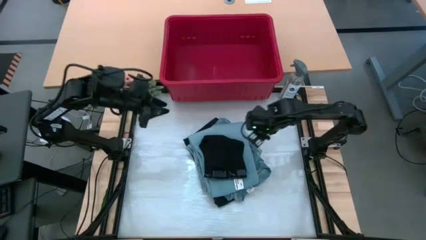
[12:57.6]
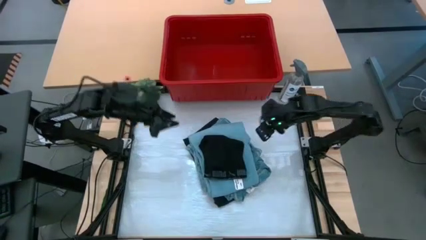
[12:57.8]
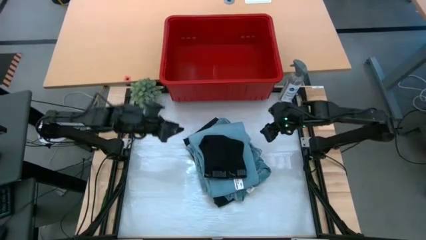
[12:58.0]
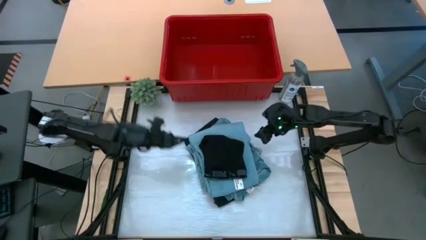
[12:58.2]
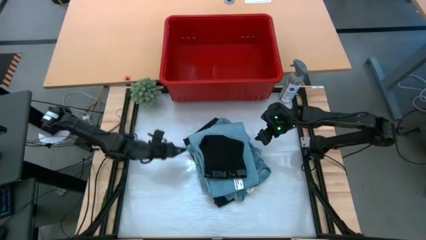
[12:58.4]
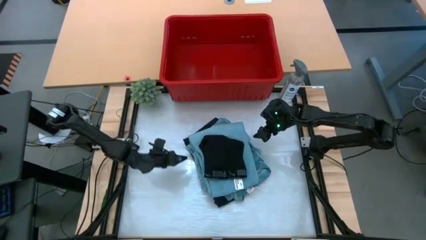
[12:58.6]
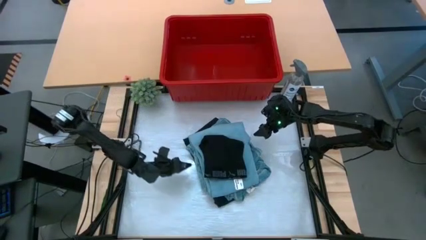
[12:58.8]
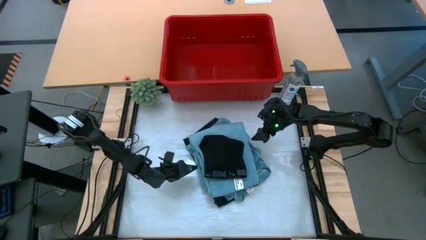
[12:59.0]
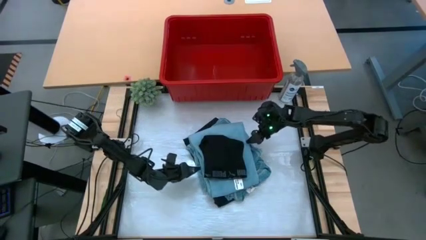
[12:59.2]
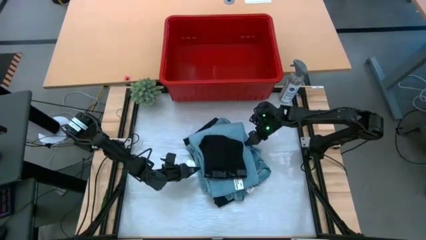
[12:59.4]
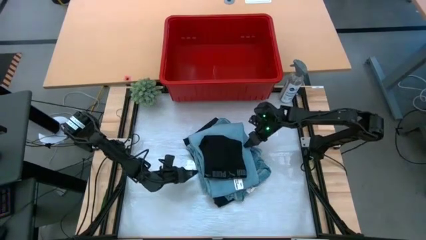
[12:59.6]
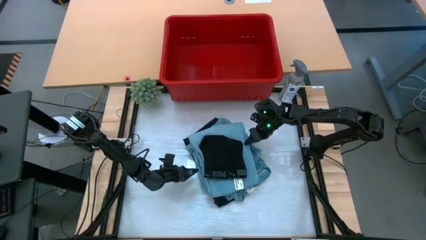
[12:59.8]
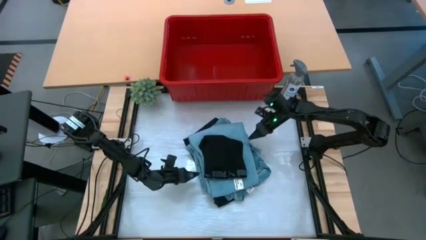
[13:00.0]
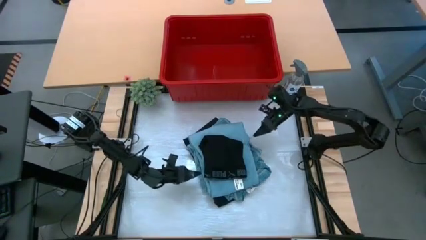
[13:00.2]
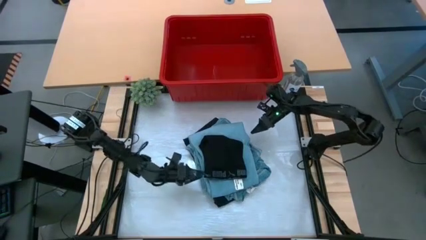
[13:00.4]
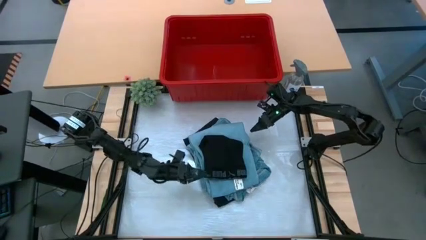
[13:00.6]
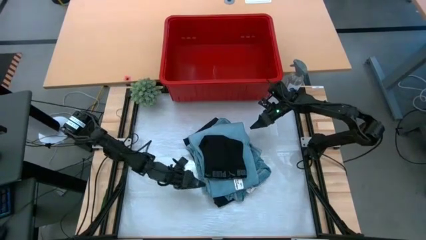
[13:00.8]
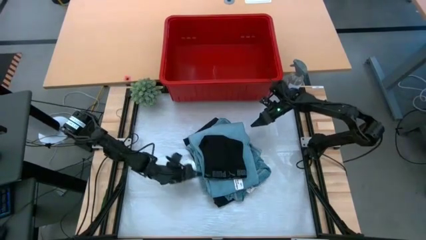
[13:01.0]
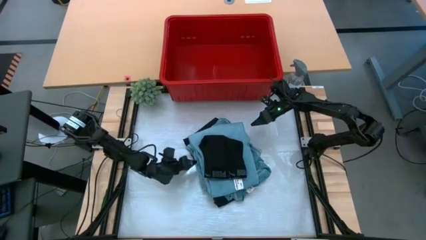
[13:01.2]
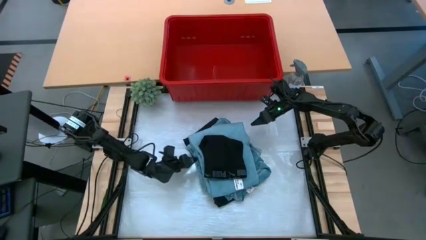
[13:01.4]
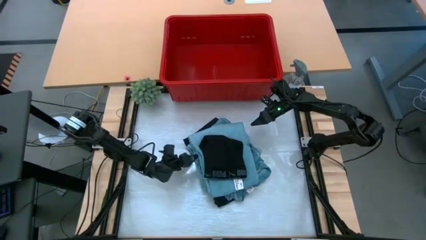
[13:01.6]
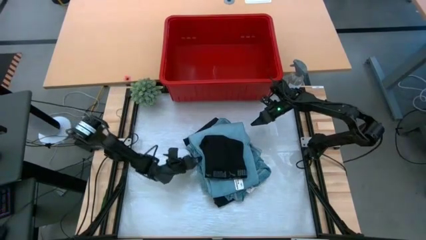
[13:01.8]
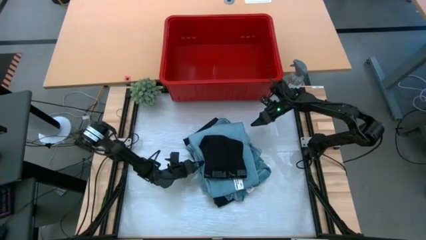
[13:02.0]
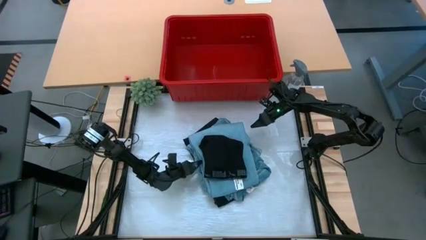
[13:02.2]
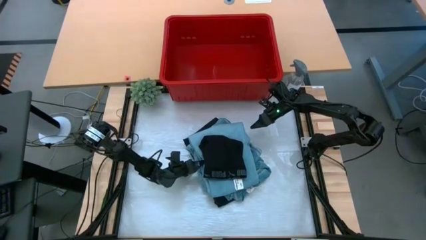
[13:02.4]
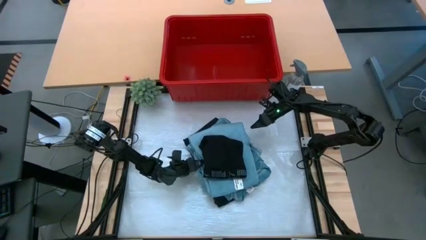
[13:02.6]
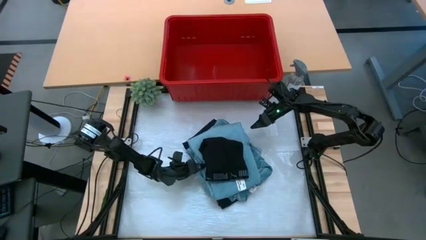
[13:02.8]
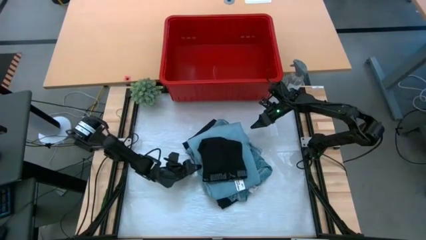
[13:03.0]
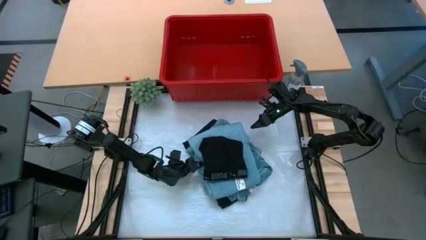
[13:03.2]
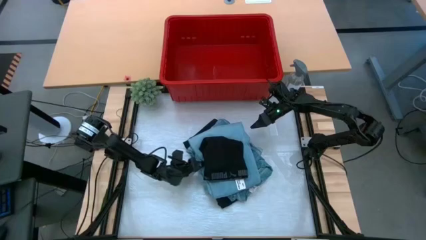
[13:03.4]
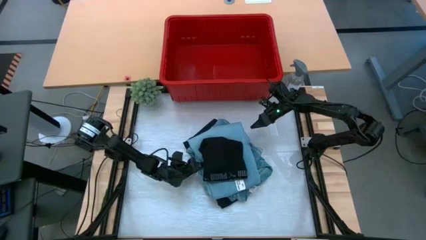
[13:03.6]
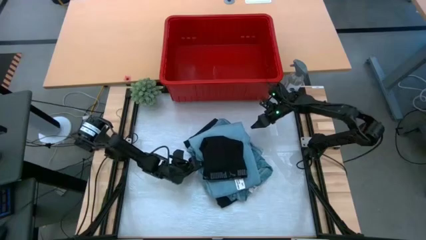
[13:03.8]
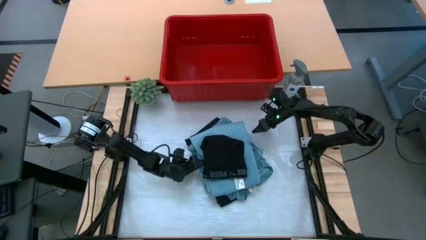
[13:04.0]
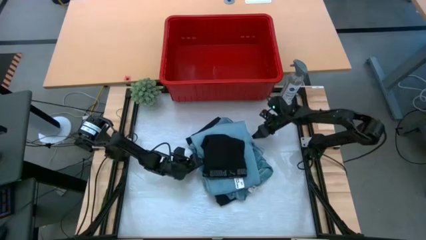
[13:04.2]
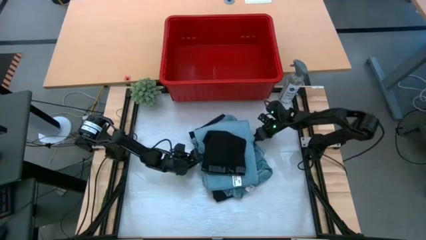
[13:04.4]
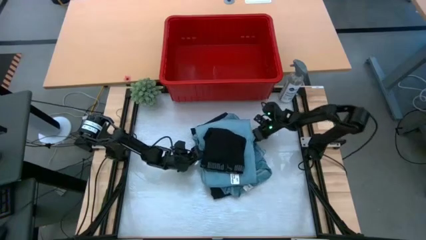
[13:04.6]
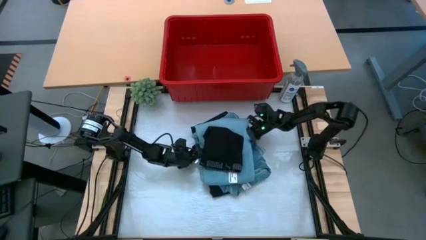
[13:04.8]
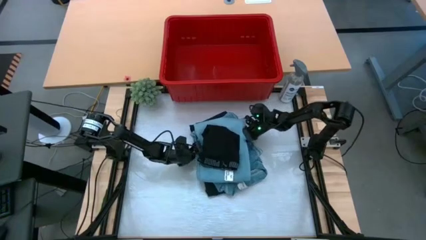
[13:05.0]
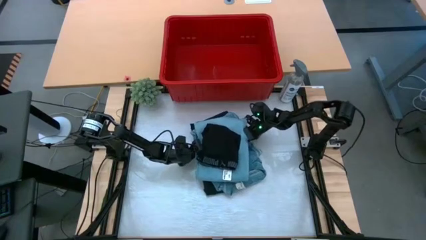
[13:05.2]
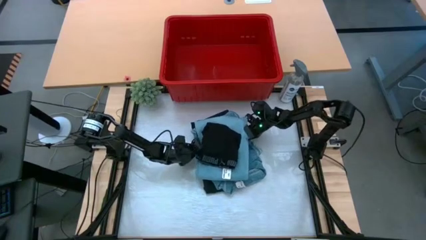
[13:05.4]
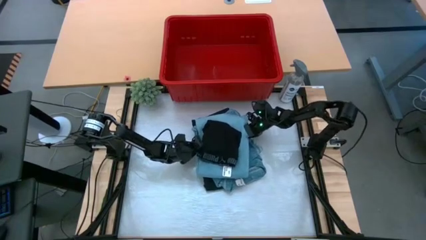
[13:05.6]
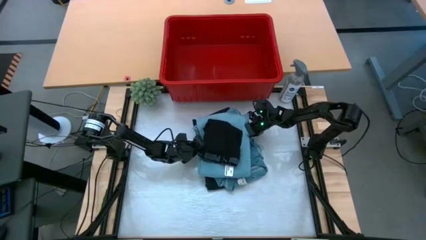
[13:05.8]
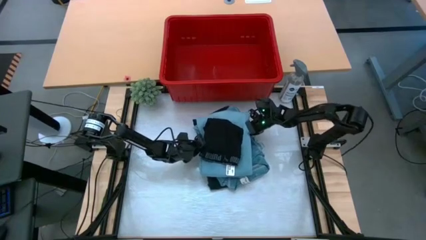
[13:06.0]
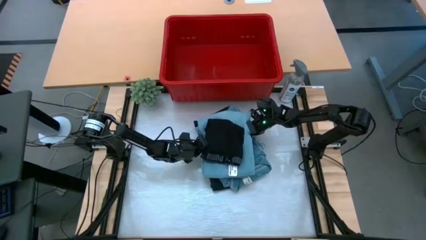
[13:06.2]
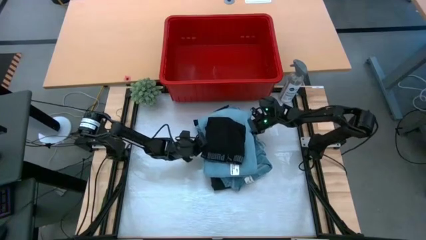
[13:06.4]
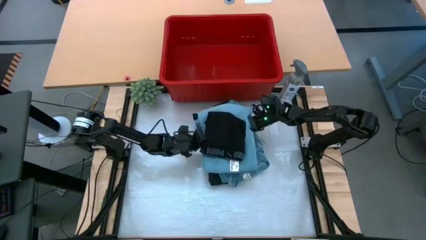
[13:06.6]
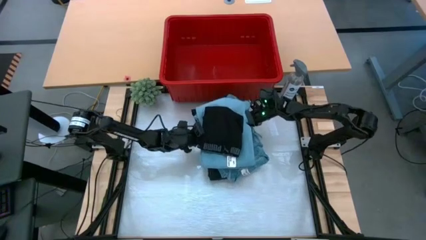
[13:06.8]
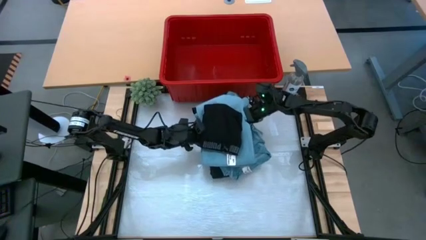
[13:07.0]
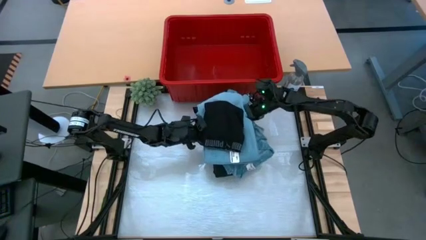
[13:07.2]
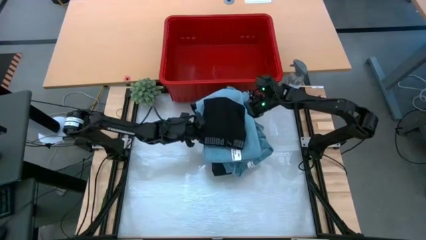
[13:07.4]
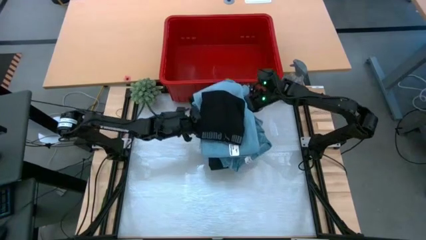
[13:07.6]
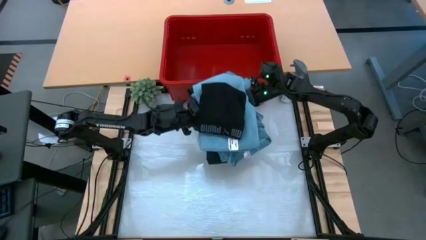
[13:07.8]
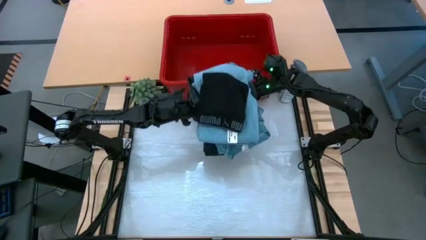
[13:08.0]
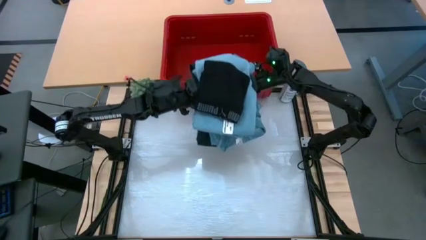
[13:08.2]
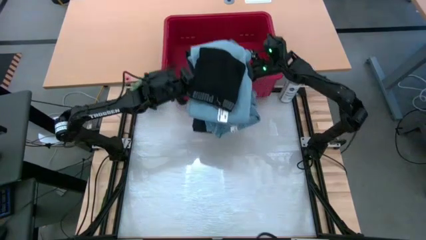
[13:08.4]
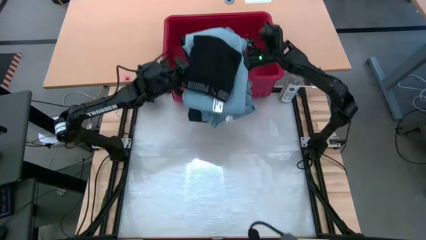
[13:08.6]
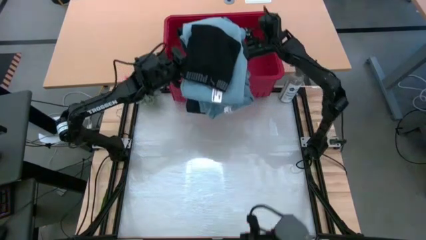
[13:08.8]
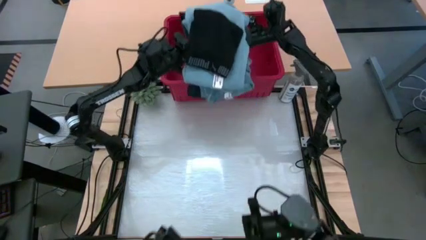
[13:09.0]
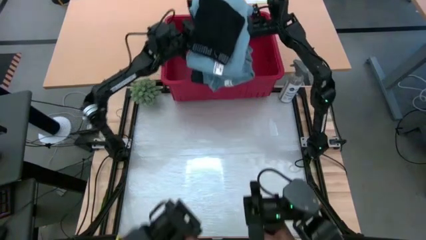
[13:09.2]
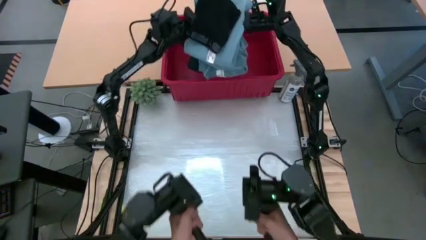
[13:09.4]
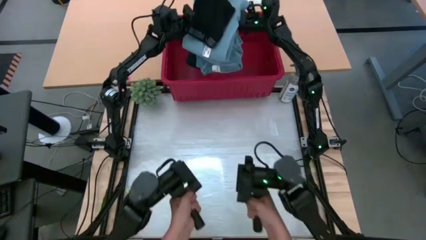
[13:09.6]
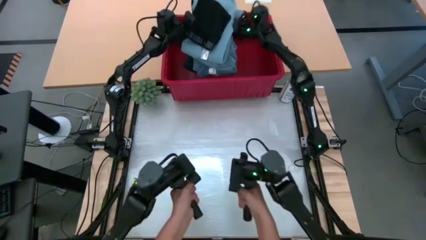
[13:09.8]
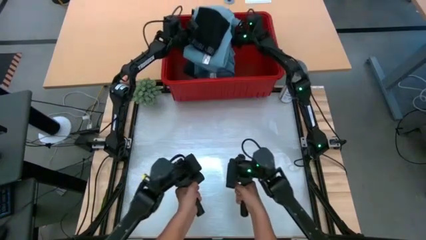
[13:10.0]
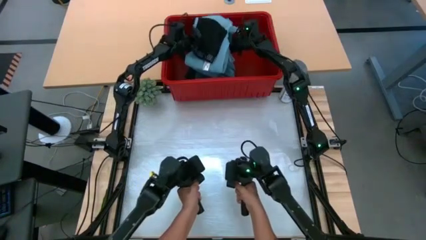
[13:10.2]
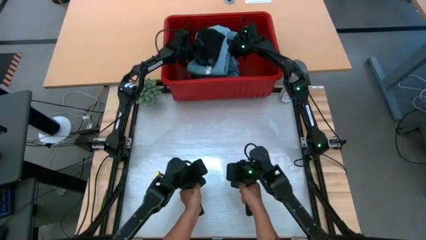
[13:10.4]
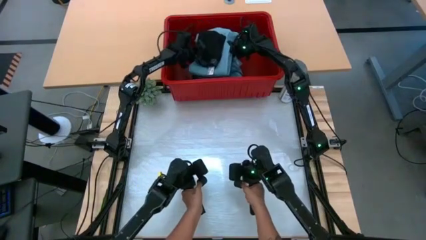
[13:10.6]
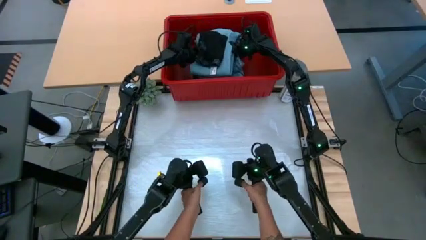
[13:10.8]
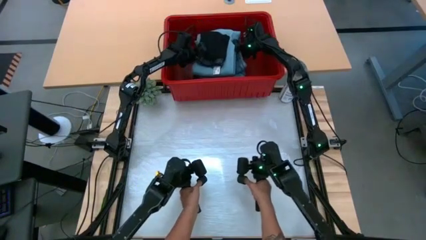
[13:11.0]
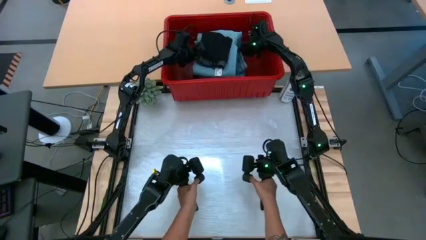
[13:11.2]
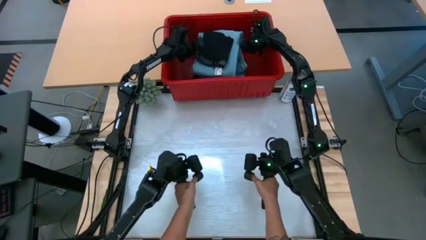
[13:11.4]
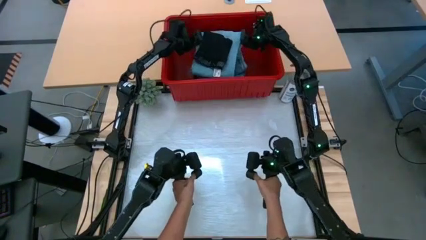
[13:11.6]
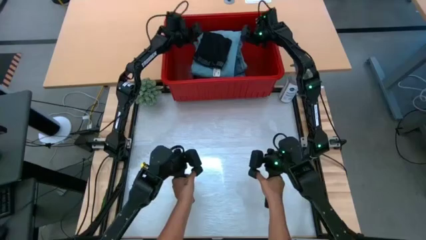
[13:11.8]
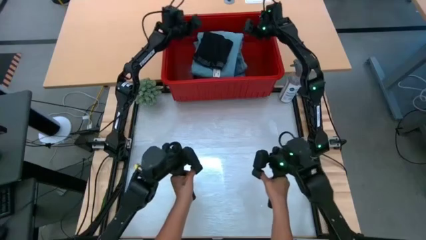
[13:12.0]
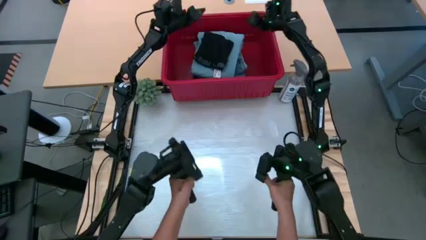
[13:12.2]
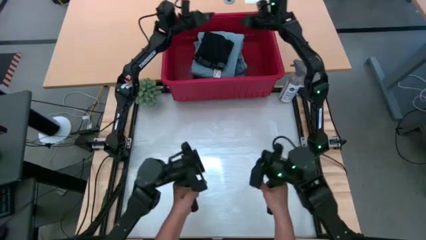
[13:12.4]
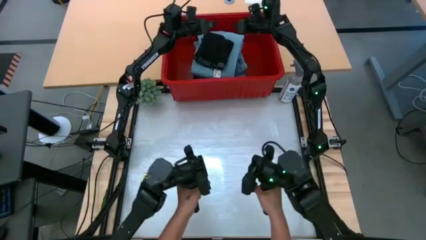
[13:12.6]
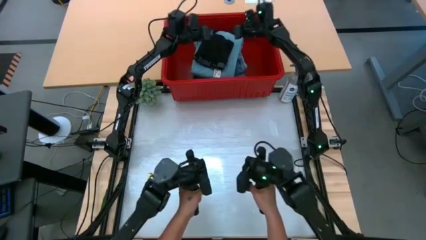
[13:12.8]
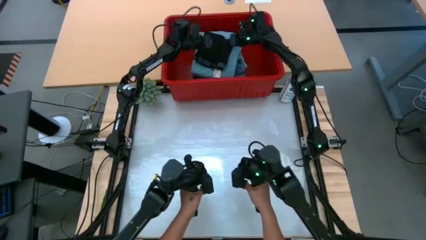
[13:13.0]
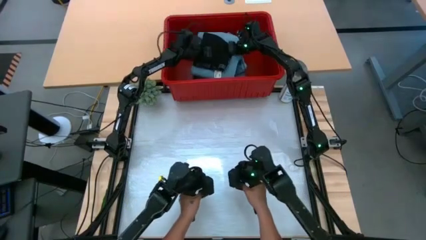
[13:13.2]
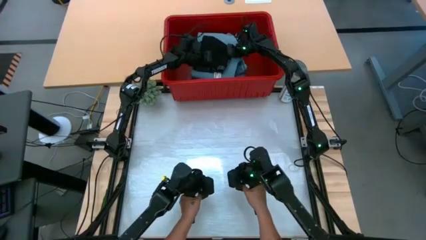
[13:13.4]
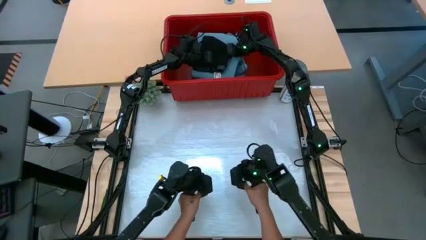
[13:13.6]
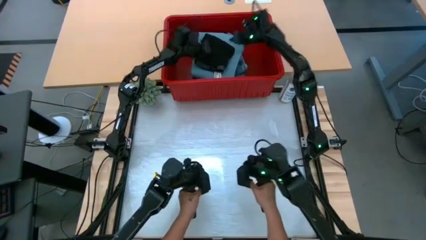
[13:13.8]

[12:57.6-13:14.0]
Task: Fold Laundry from Bin
Put the laundry clothes into the red bin
